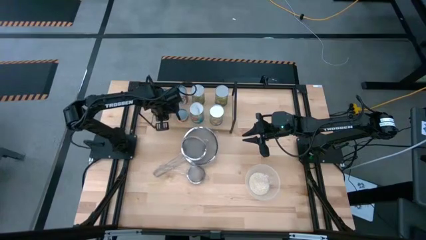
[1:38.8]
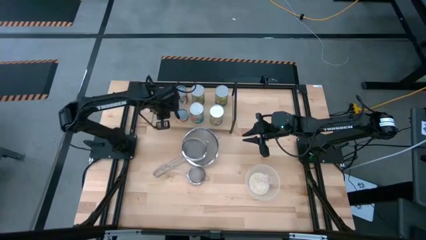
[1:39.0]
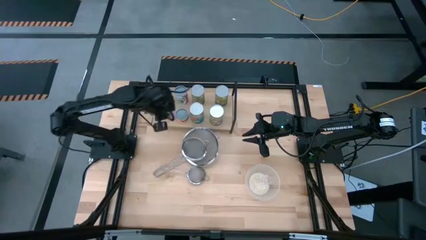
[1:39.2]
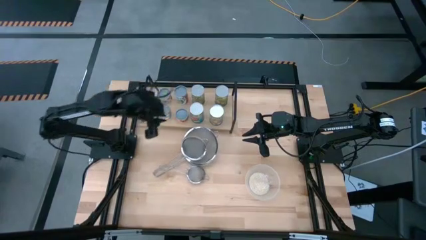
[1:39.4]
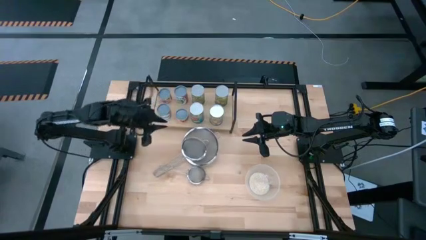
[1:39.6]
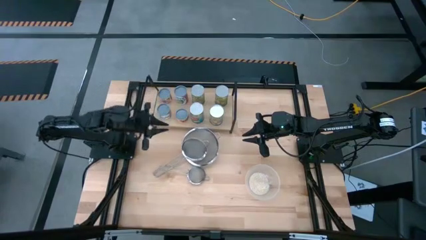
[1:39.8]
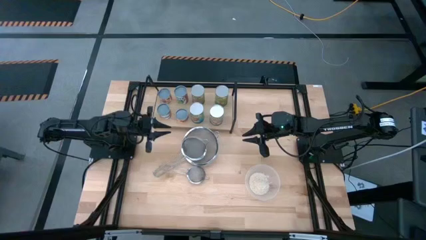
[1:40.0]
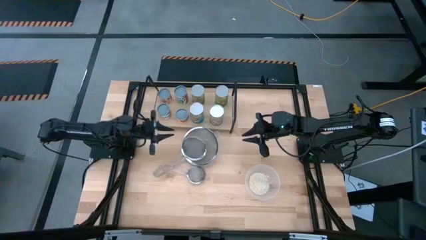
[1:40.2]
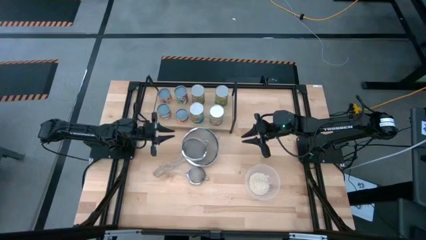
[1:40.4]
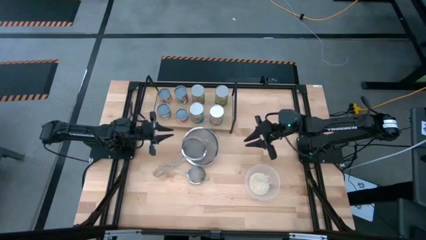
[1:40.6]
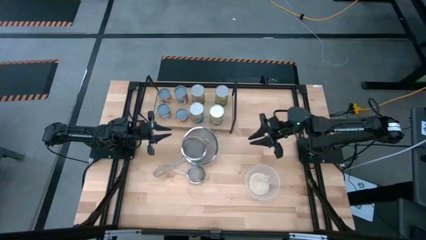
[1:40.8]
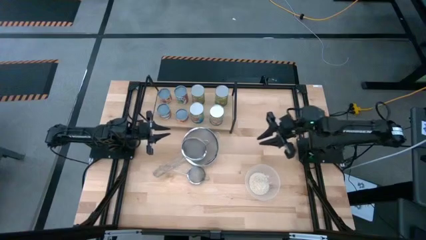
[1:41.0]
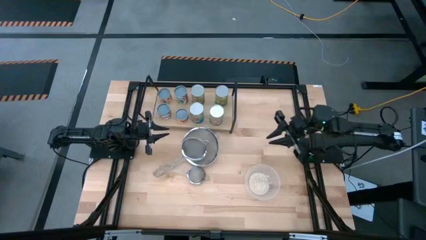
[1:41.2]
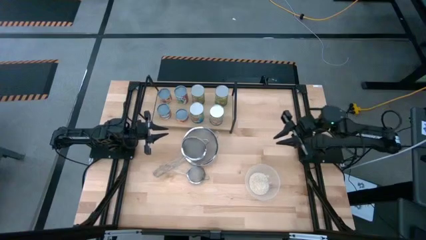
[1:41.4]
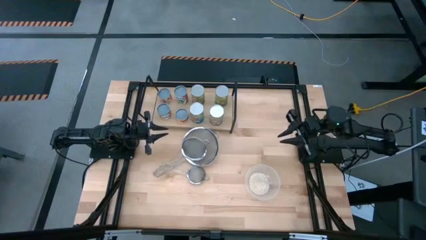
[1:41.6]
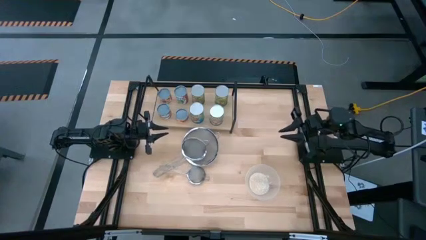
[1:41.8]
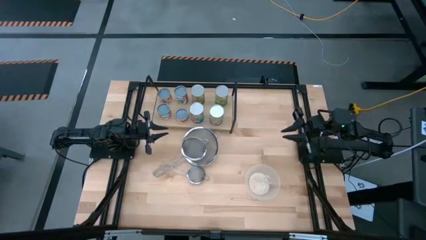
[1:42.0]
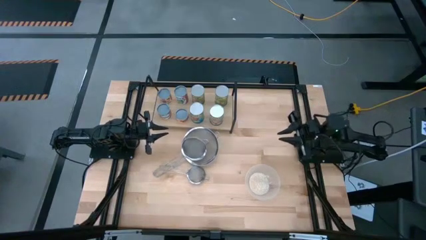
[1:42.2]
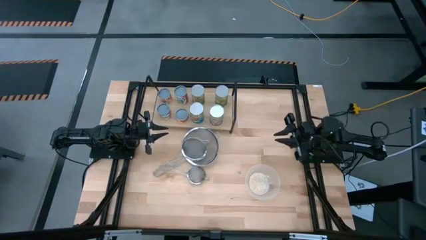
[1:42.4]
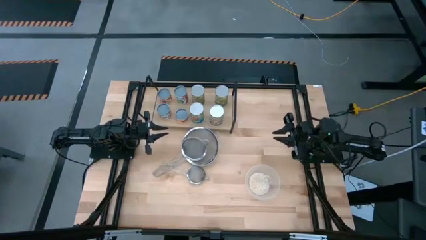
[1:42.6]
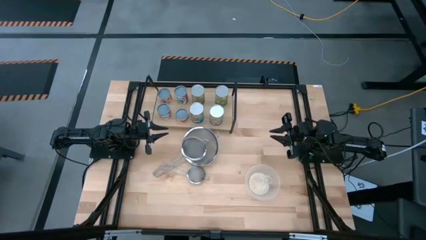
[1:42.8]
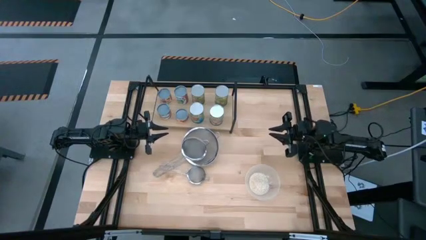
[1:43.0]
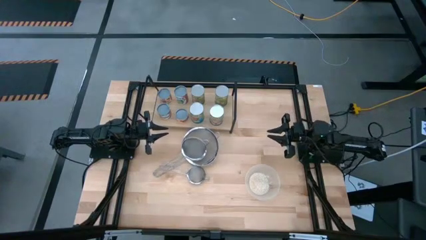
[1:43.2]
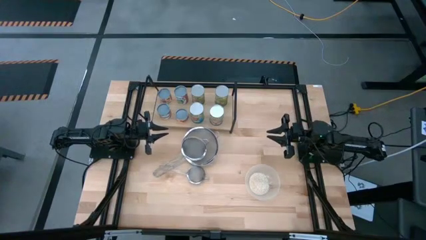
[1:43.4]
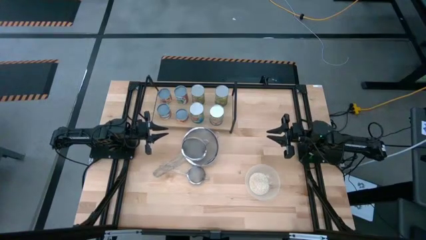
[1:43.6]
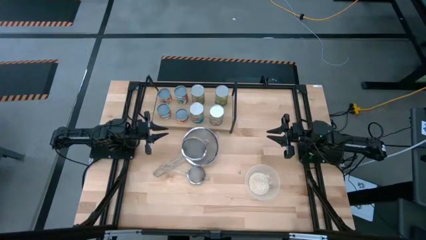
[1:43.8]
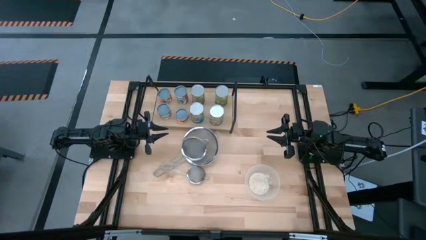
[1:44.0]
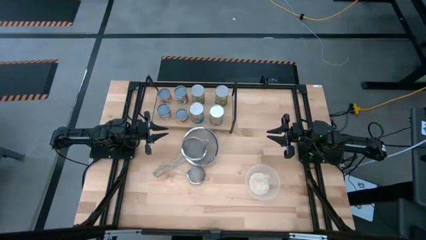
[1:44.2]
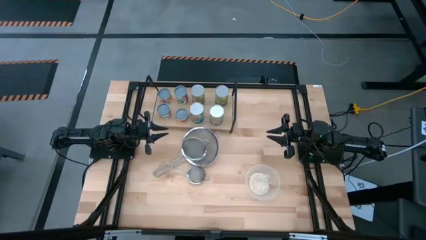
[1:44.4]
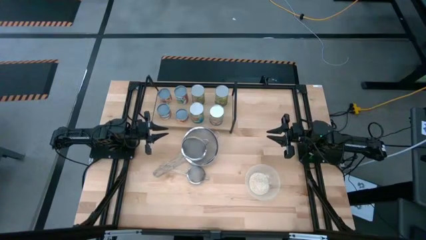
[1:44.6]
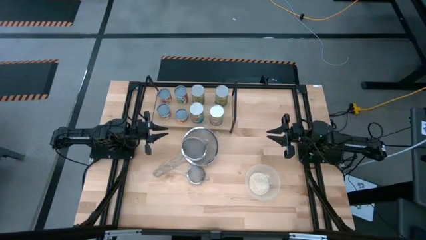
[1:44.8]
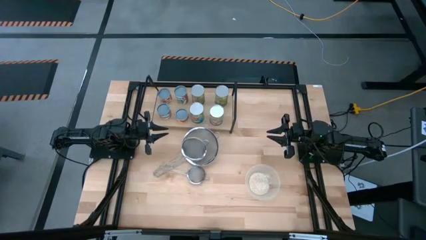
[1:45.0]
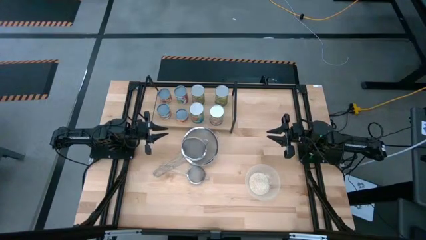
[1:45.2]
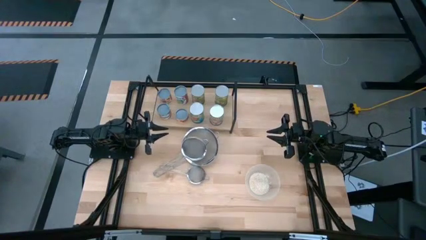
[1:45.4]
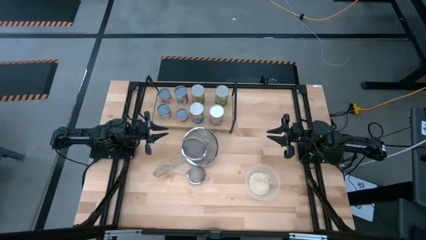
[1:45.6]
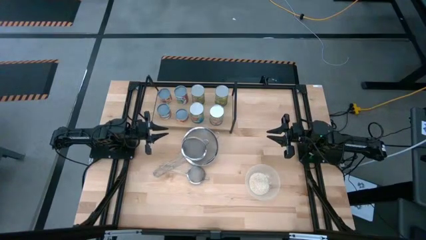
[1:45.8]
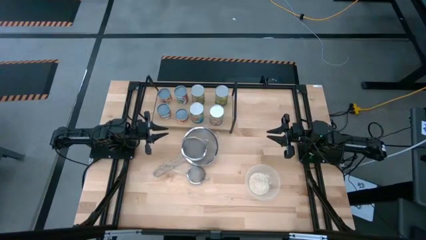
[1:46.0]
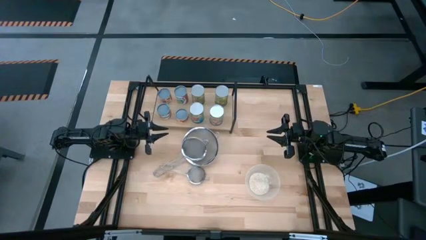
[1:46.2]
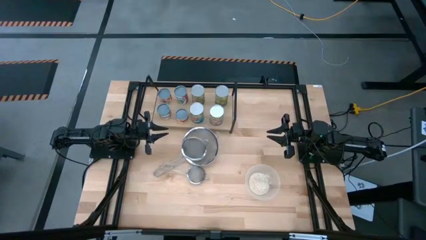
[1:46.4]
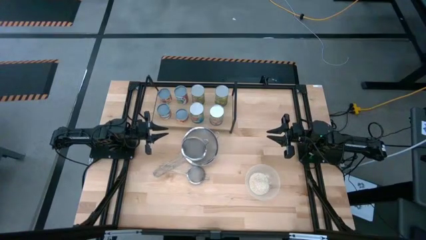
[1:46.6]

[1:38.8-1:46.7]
Task: Pick and place cans onto a shelf
Return to Home Position

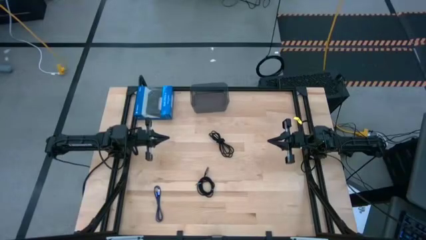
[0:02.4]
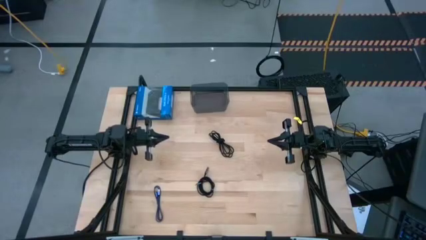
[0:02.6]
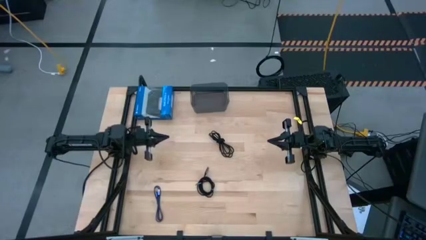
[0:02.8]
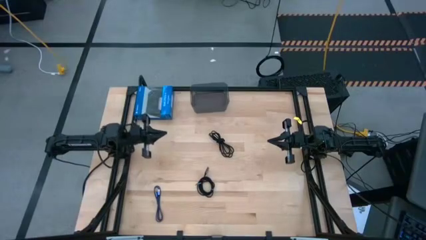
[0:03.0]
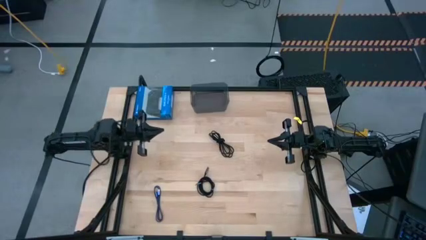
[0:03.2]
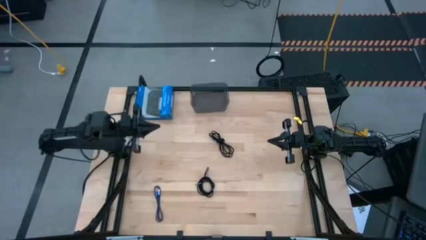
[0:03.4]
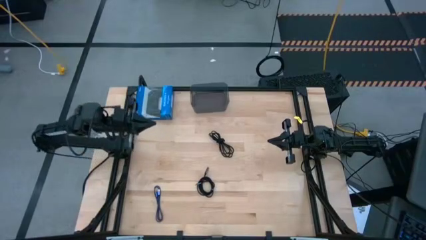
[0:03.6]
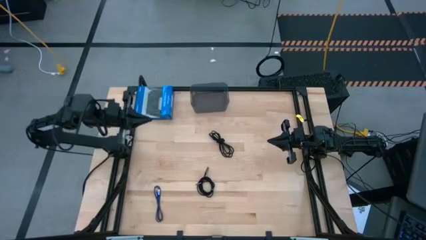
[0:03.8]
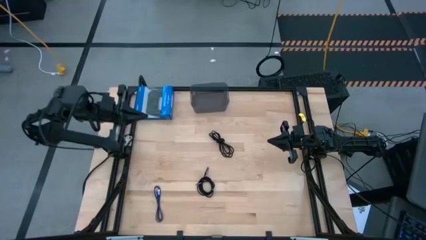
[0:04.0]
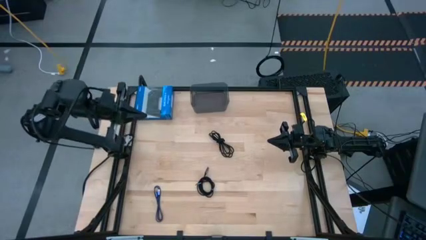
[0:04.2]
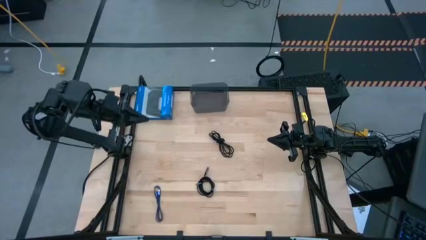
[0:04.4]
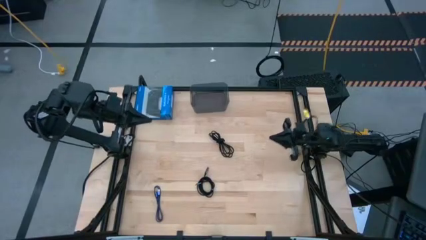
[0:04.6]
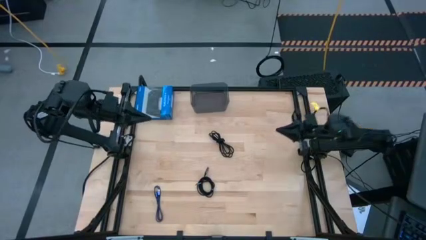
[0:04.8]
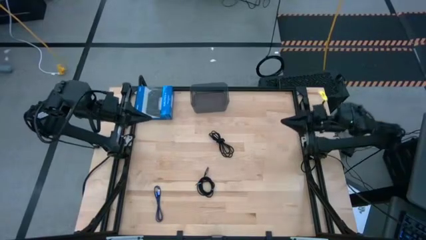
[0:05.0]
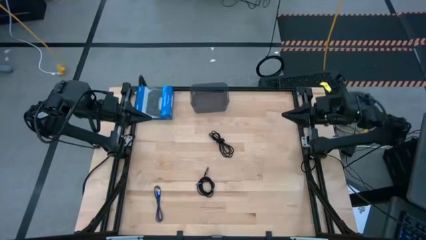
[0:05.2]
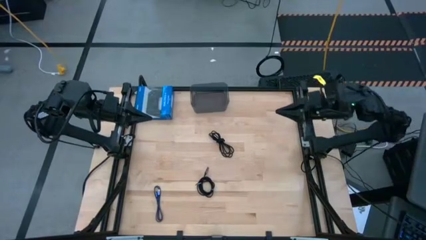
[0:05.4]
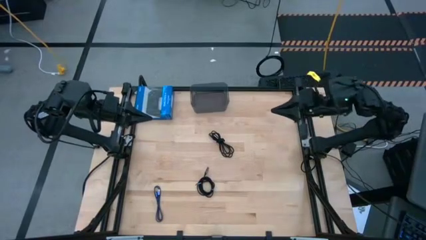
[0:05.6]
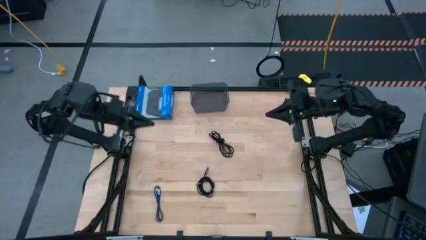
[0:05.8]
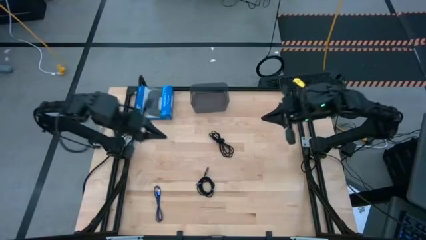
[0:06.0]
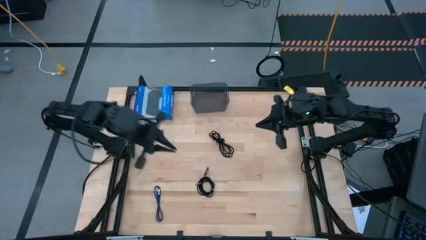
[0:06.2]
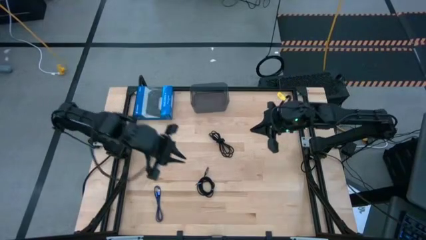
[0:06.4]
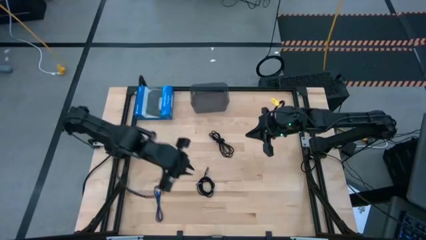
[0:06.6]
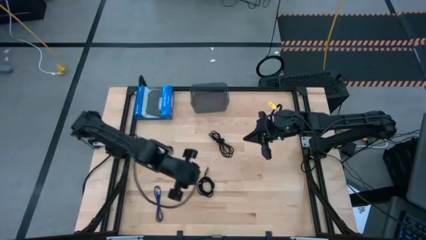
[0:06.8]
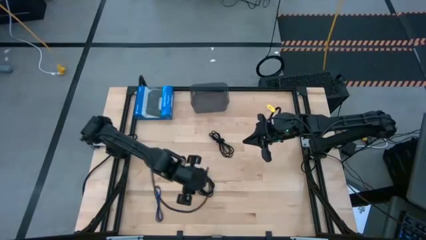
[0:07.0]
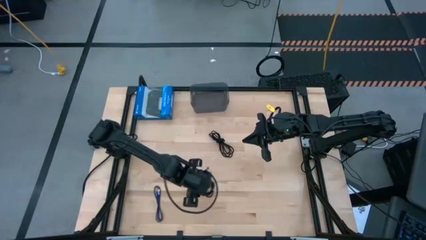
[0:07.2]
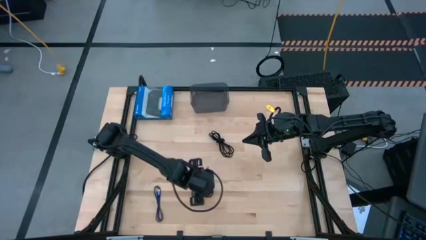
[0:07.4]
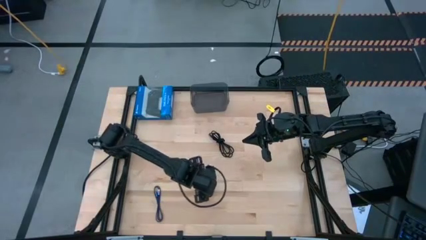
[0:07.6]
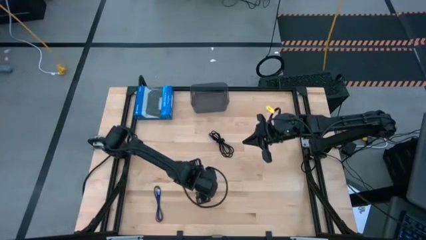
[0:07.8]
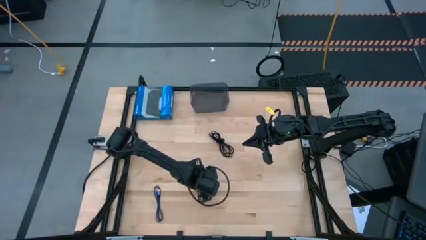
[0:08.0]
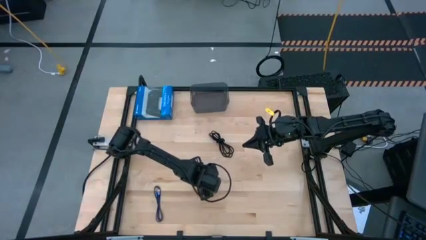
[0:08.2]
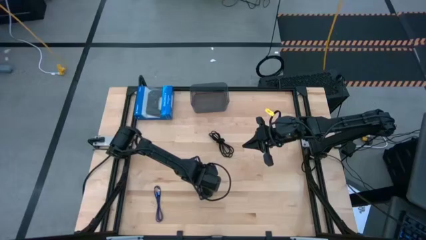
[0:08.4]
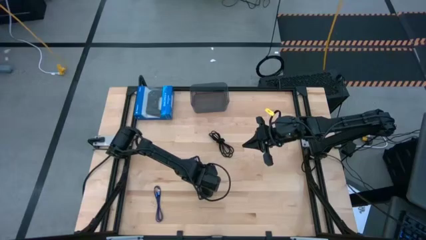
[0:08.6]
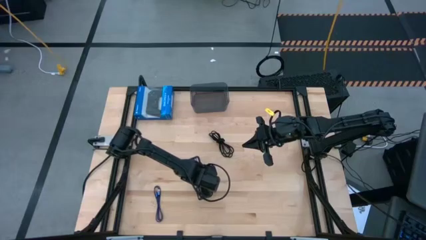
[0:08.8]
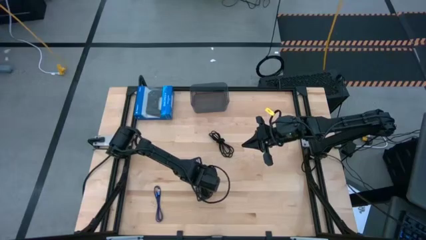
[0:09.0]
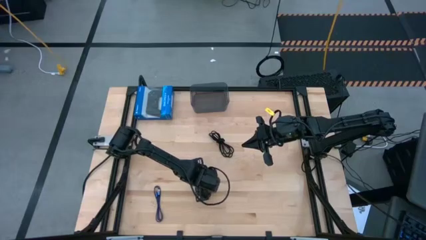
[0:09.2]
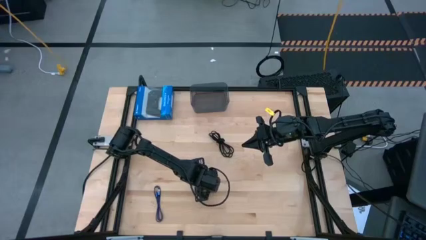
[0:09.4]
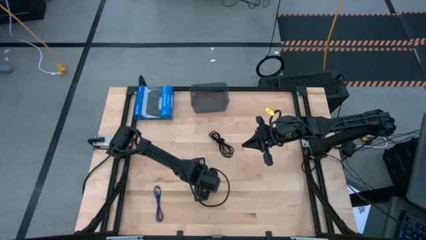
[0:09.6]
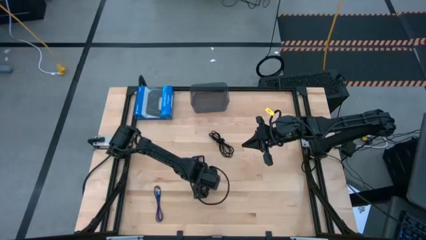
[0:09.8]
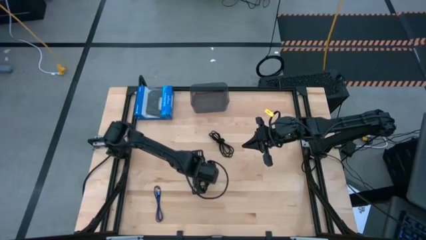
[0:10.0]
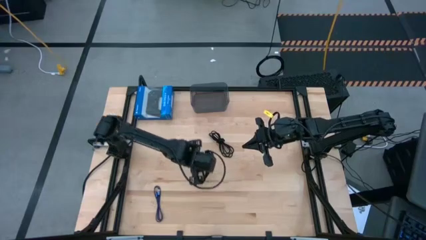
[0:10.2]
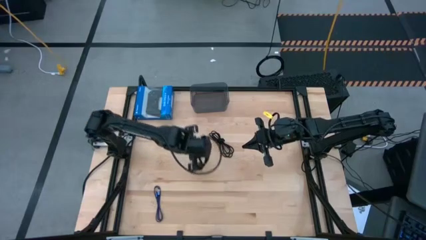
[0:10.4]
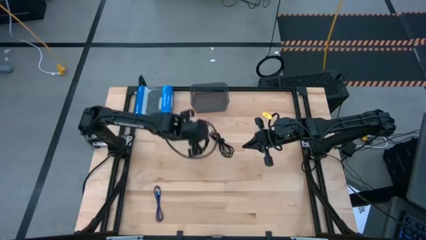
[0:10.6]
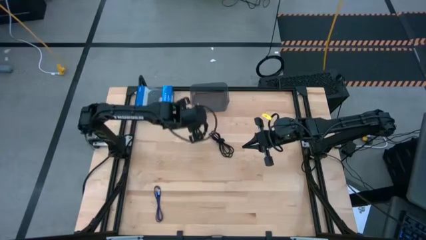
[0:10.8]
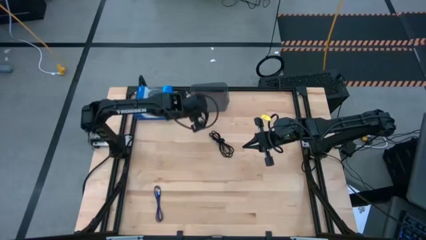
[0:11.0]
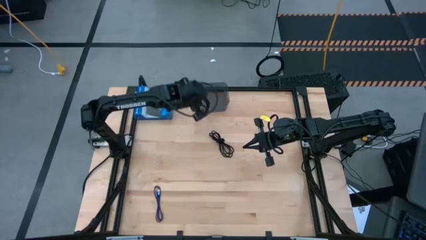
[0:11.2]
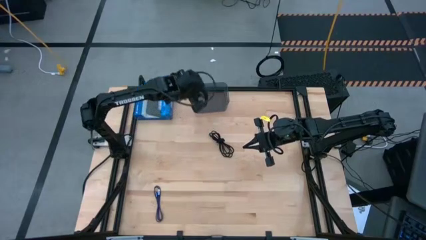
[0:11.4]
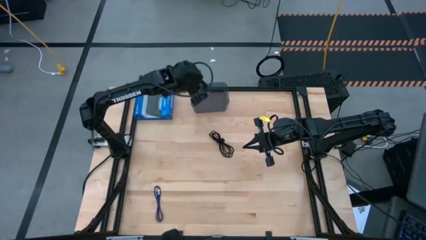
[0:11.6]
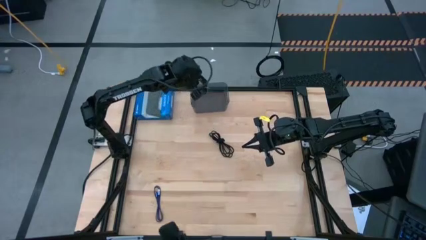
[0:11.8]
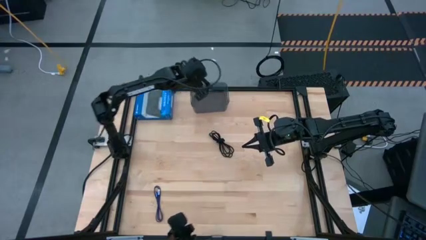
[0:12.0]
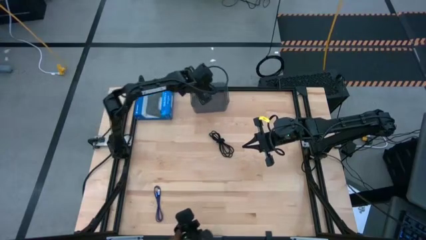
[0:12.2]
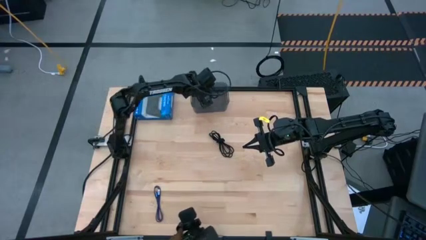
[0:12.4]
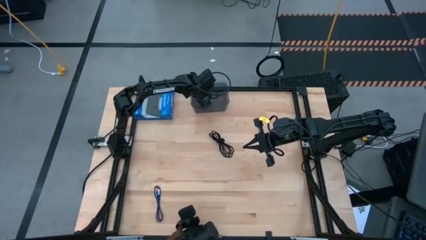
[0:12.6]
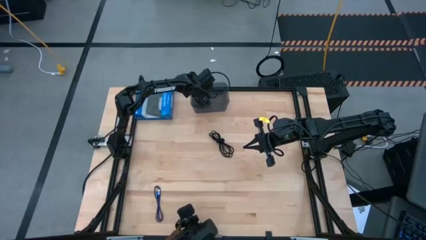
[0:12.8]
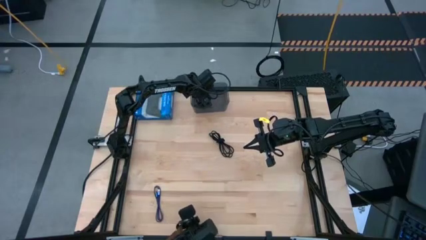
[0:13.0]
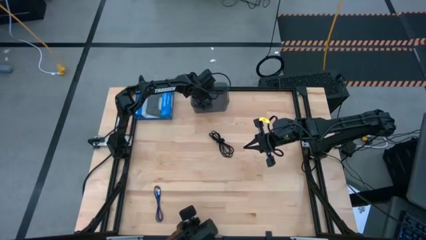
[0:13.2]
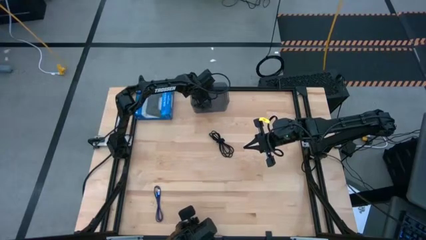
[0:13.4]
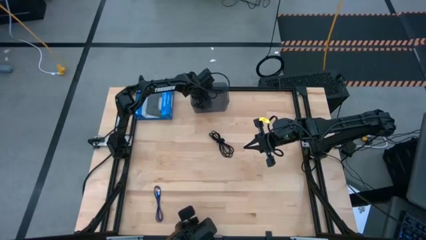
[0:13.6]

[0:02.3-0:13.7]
Task: Pick and place USB-C Cables
Put the bottom black charger cable into the black bin
